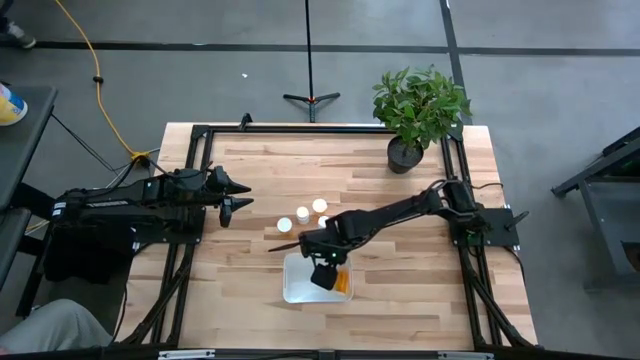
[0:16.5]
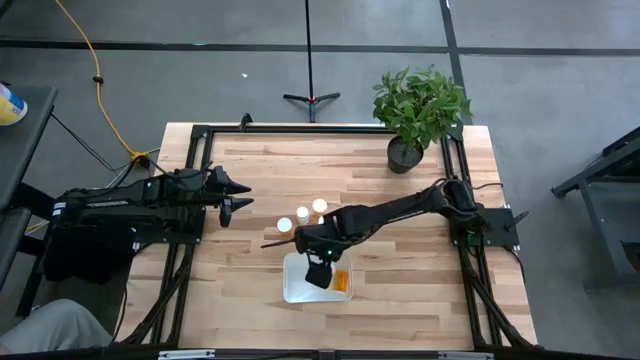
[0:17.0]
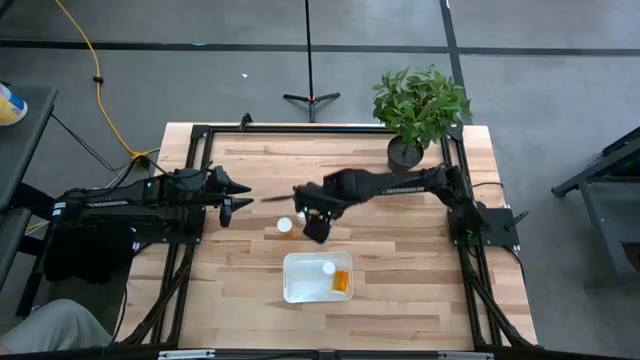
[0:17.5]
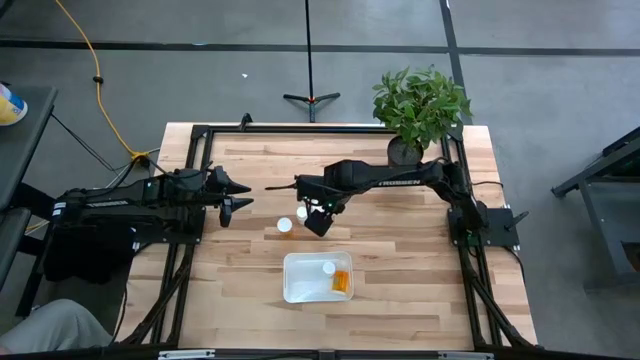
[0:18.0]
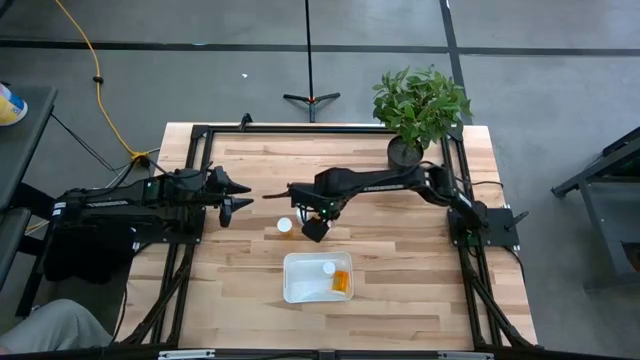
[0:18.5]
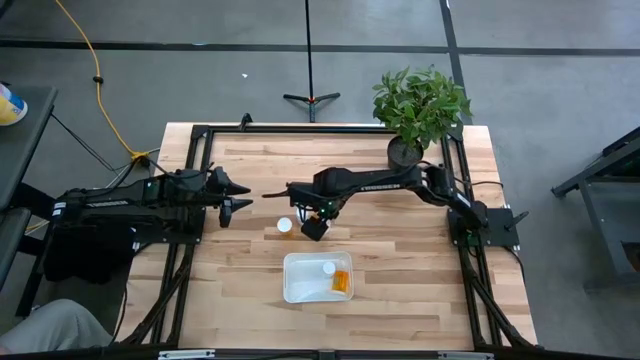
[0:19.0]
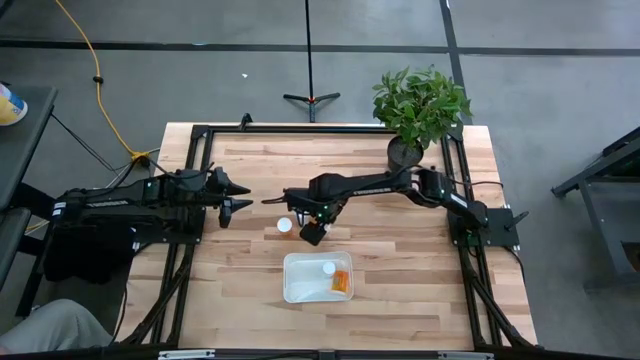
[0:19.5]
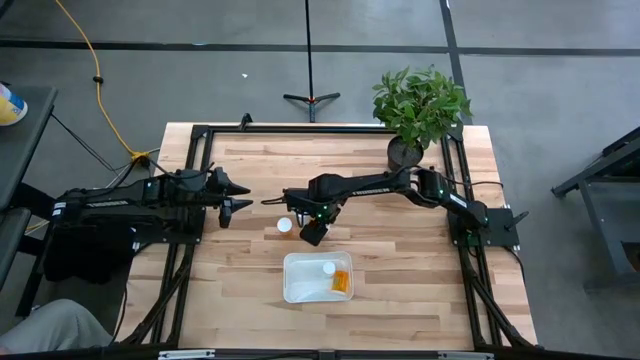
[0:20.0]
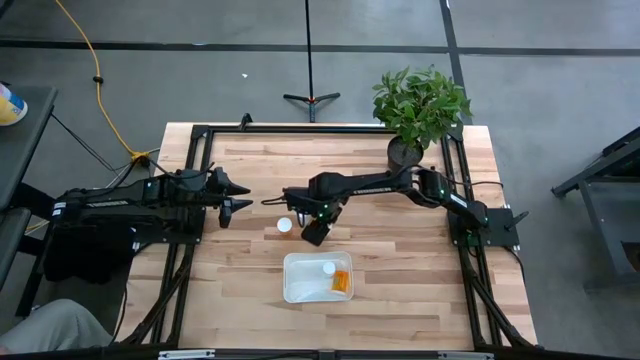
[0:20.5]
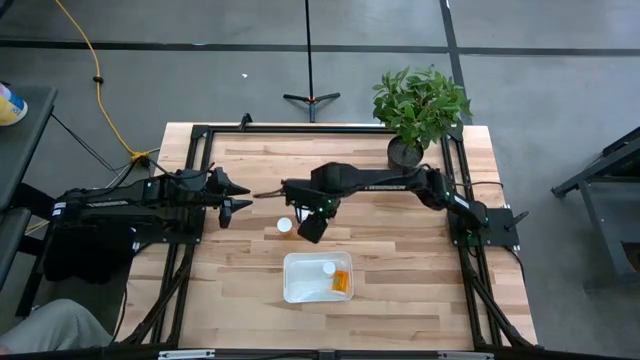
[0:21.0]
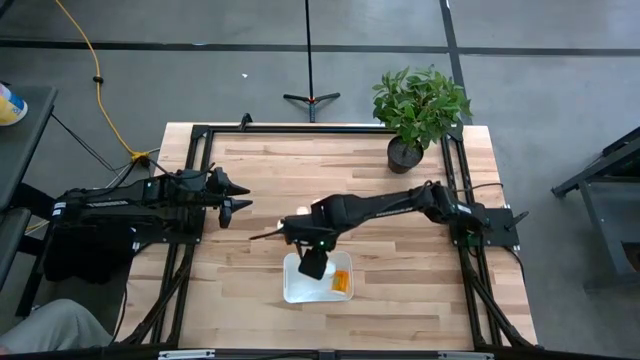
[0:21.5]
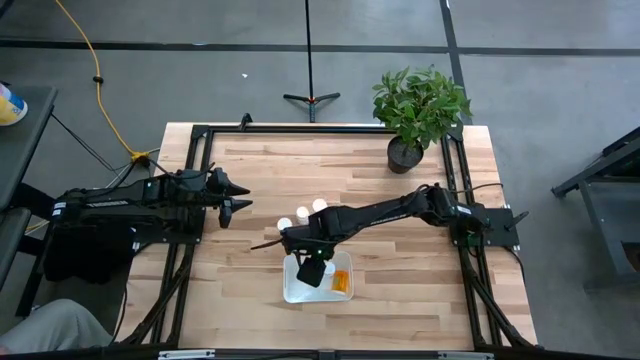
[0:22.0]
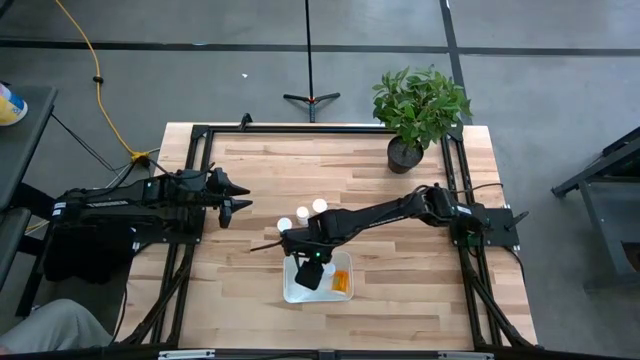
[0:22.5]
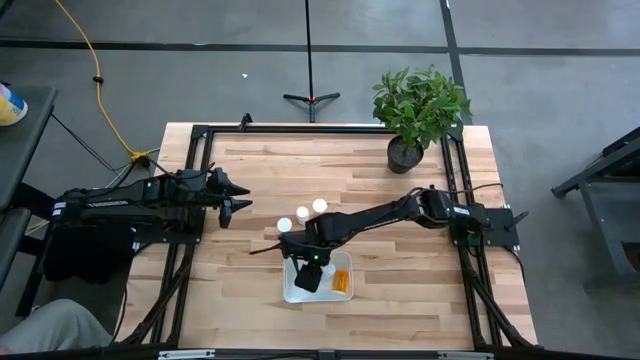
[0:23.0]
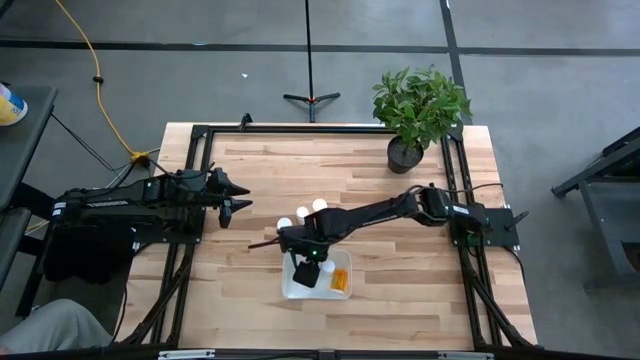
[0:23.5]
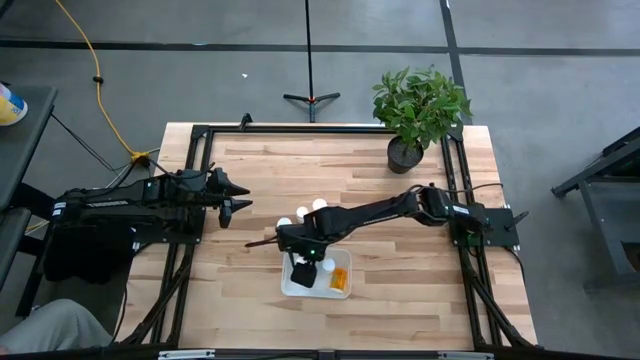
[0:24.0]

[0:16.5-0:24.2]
Task: Pick and place pill bottles into a basket
Put the right white pill bottle into the white bin

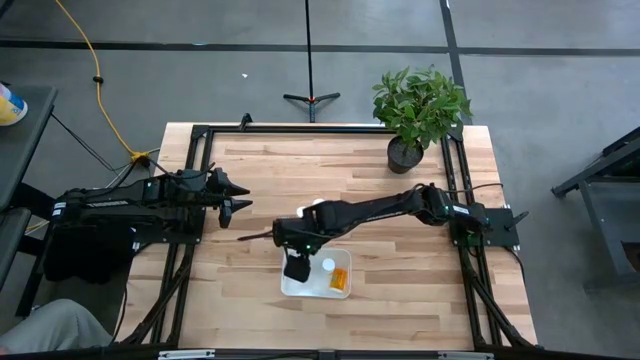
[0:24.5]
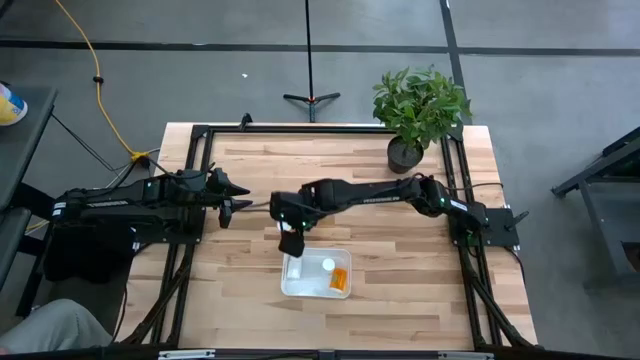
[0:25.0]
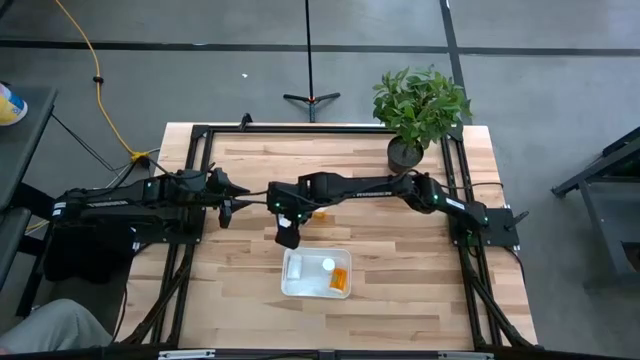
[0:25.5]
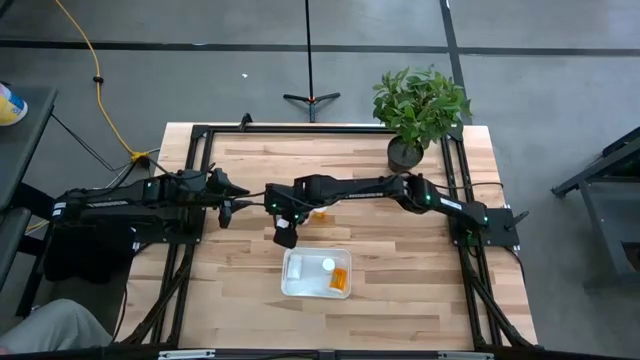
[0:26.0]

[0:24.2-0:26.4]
Put the left orange pill bottle into the white bin

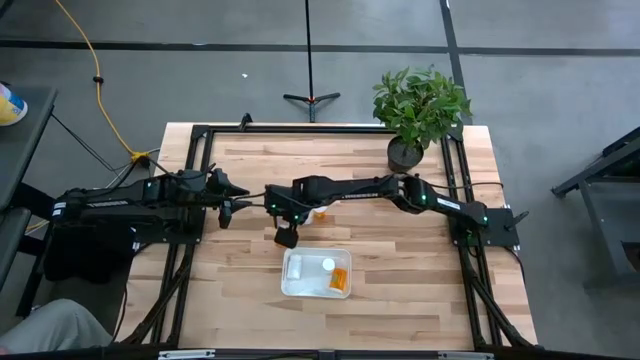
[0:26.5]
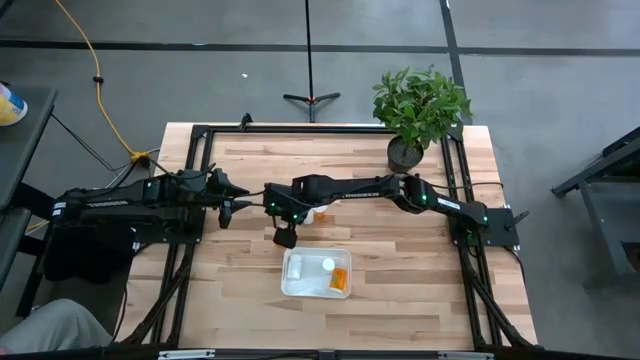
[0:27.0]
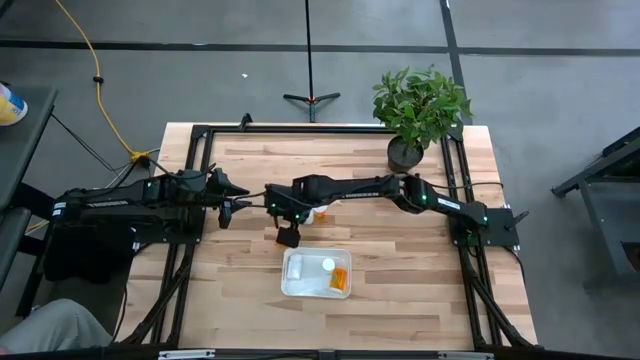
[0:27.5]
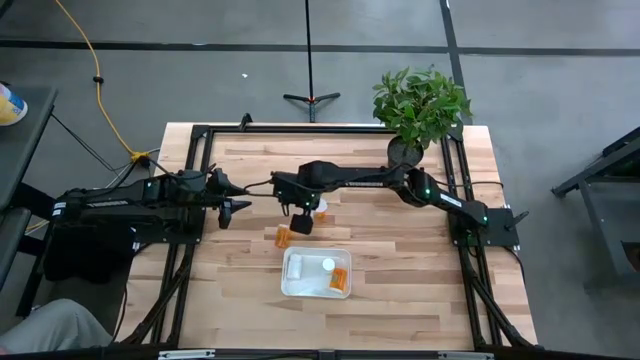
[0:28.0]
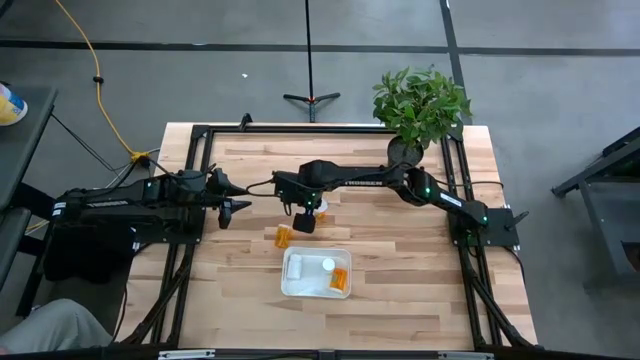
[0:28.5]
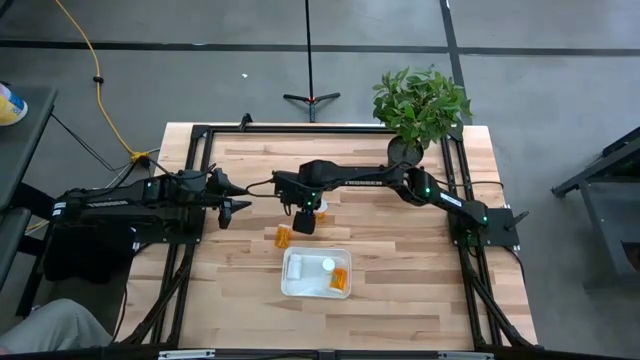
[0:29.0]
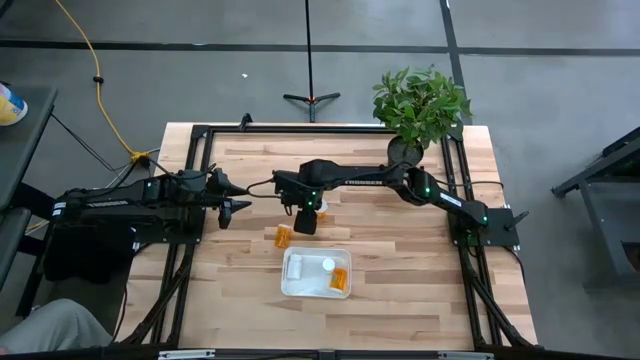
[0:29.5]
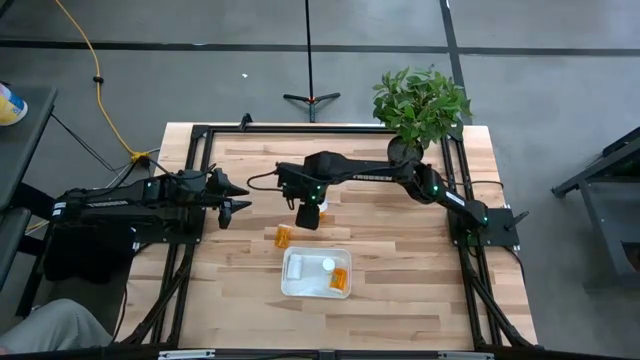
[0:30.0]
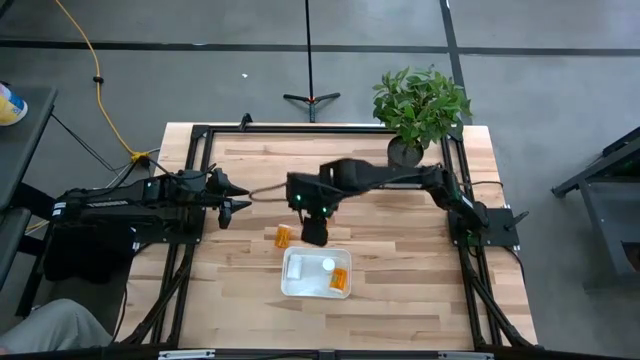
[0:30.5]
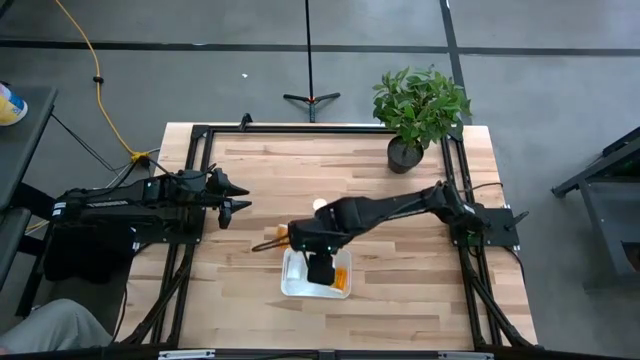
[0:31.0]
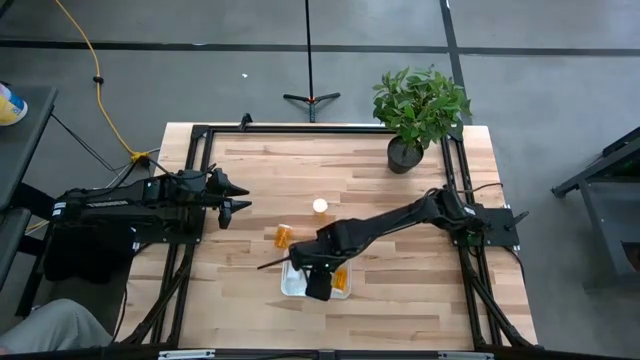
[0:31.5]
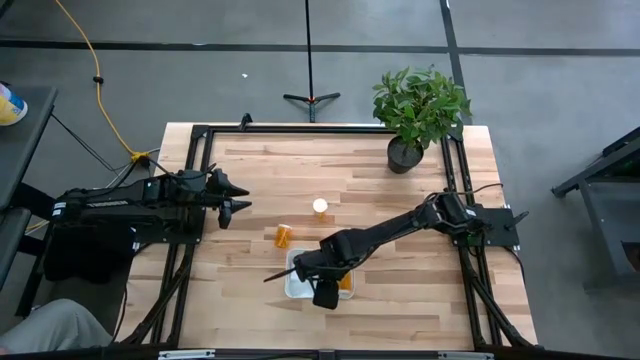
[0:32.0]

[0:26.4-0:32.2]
Put the white pill bottle into the white bin

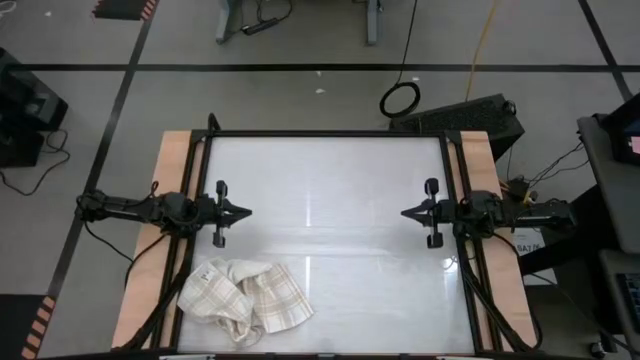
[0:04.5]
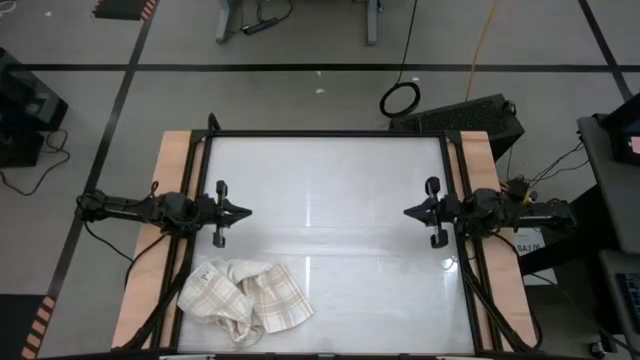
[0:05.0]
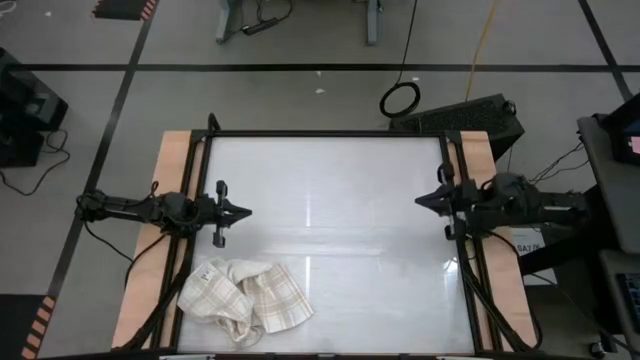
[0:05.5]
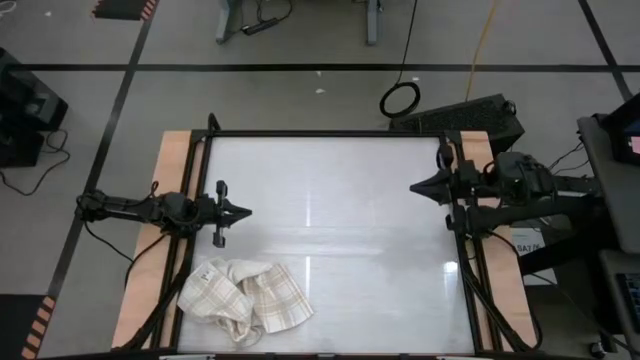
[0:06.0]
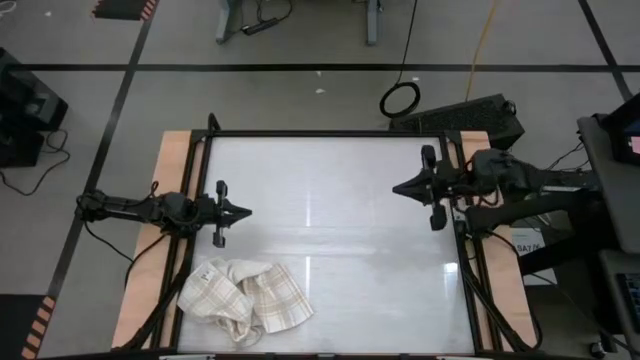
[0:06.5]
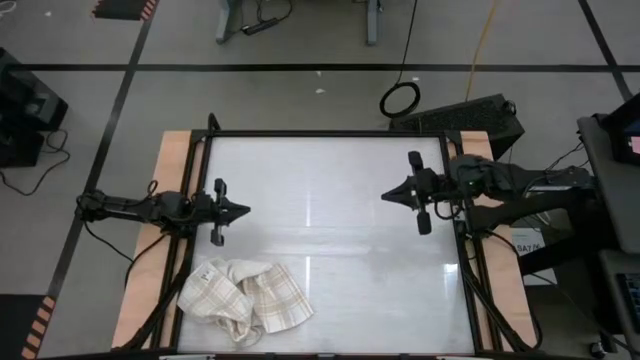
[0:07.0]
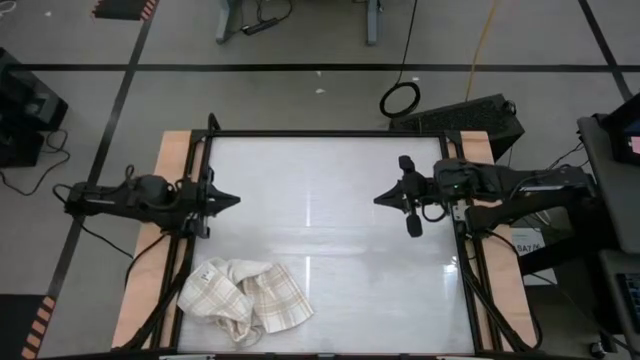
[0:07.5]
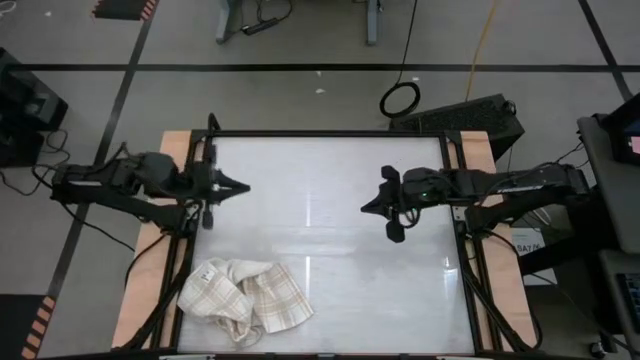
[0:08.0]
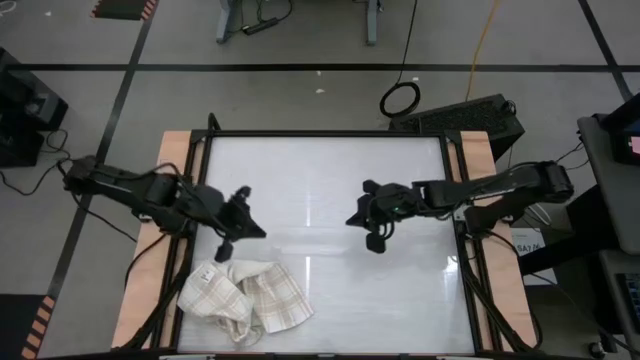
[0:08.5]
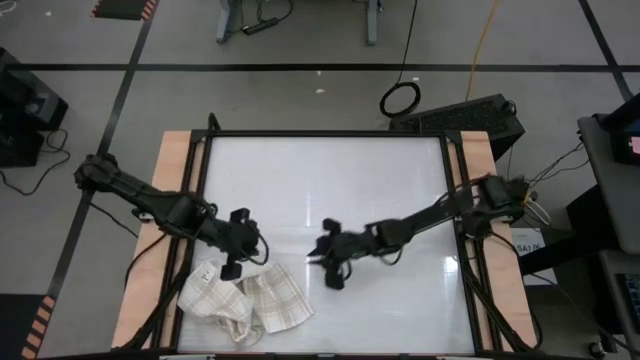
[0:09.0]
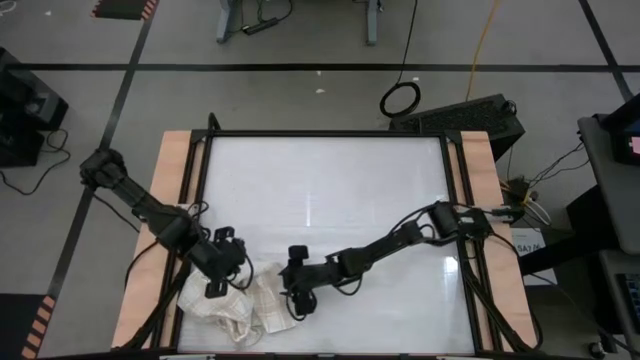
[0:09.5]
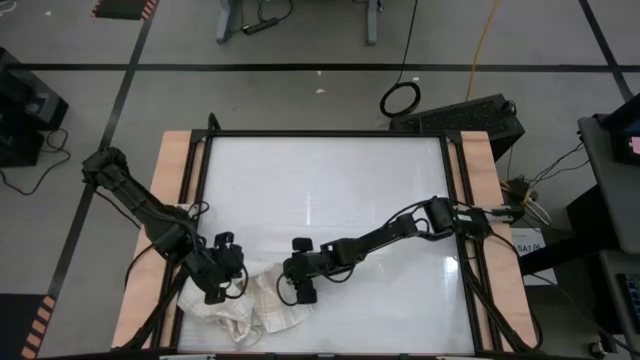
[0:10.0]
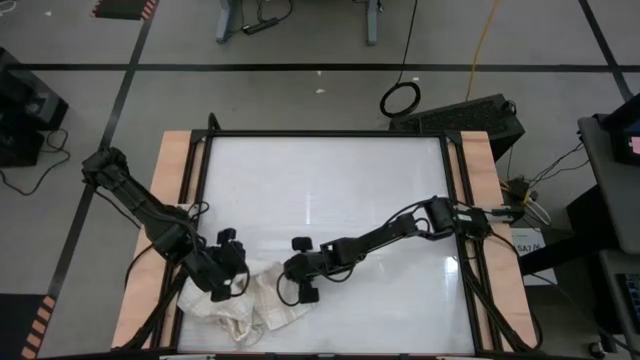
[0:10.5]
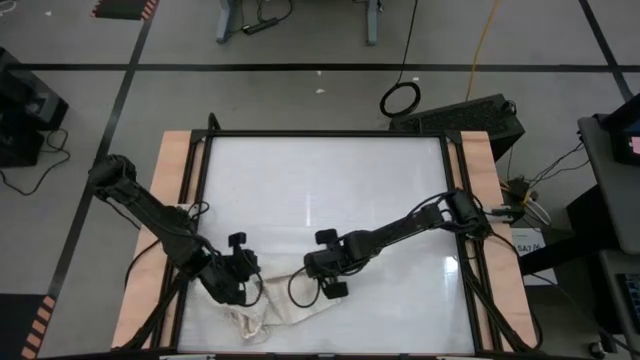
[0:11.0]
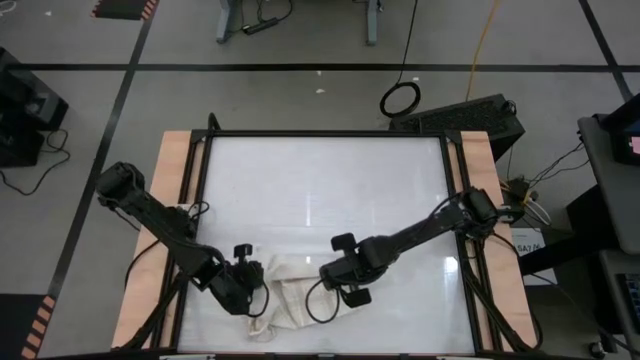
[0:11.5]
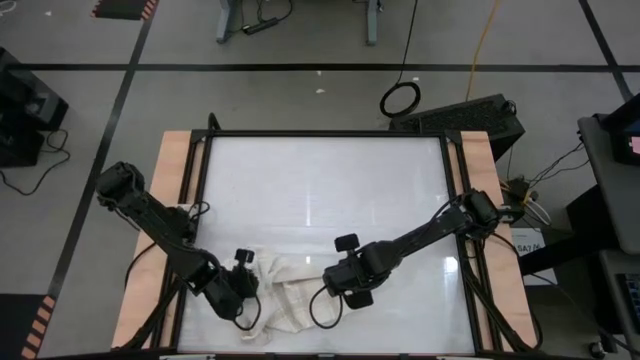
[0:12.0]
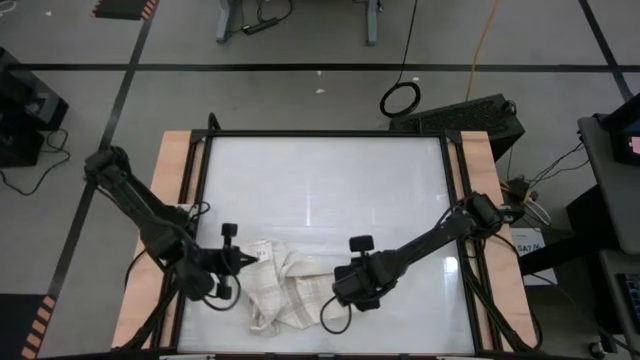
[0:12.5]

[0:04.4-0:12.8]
Task: Roll towel
Roll the white-brown patterned towel
